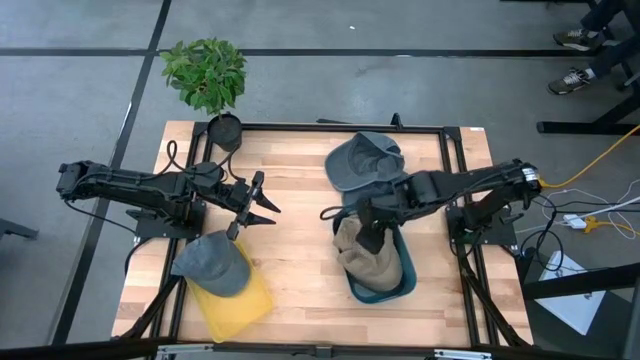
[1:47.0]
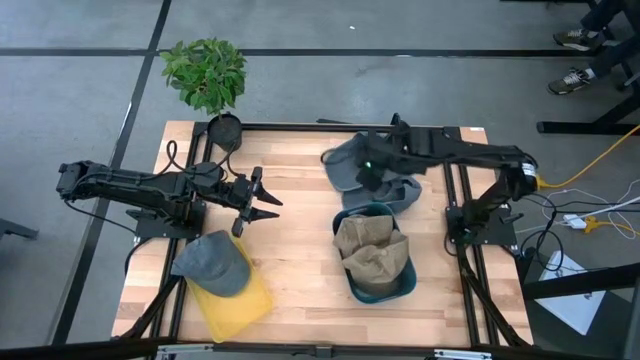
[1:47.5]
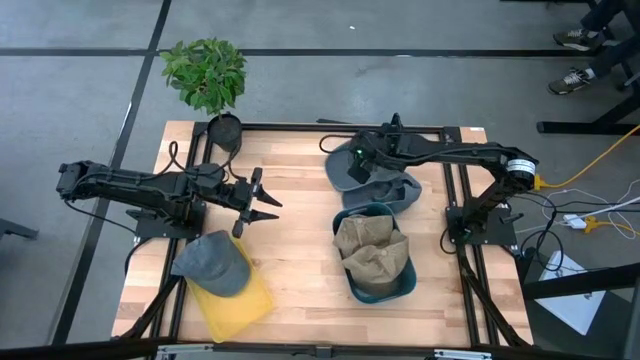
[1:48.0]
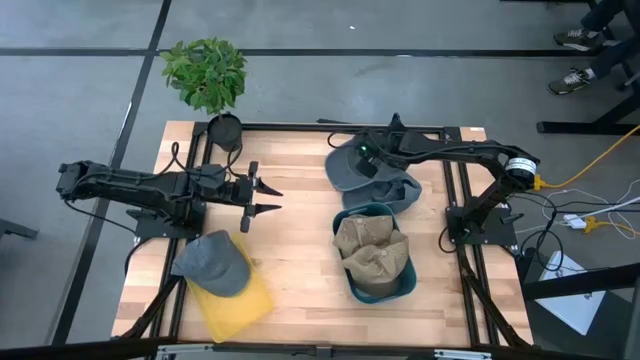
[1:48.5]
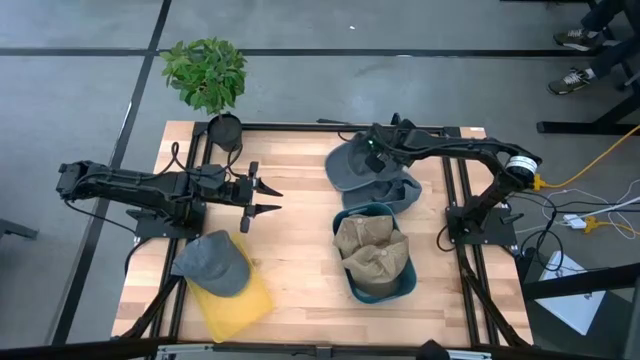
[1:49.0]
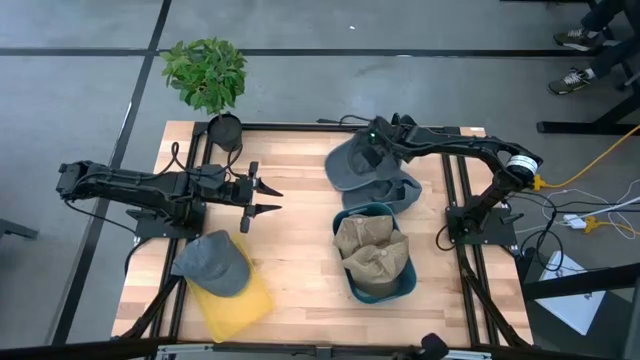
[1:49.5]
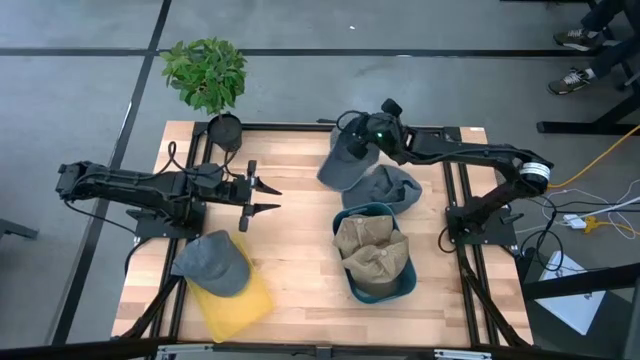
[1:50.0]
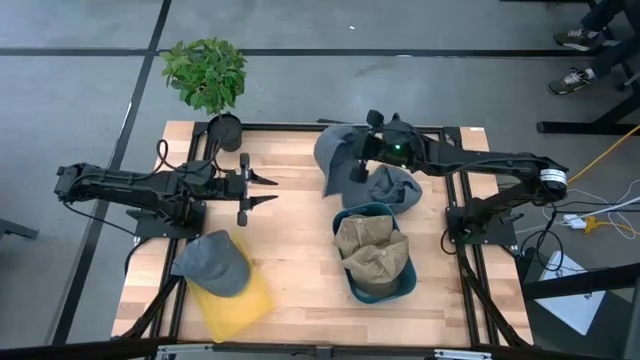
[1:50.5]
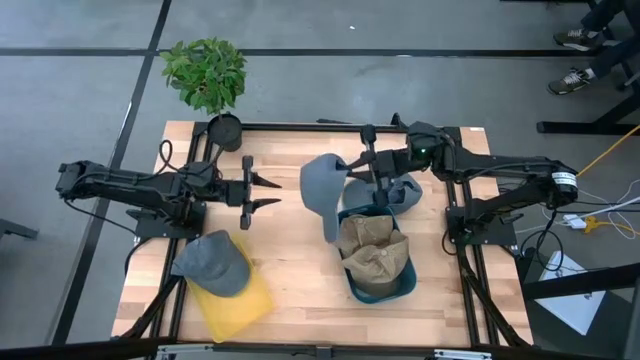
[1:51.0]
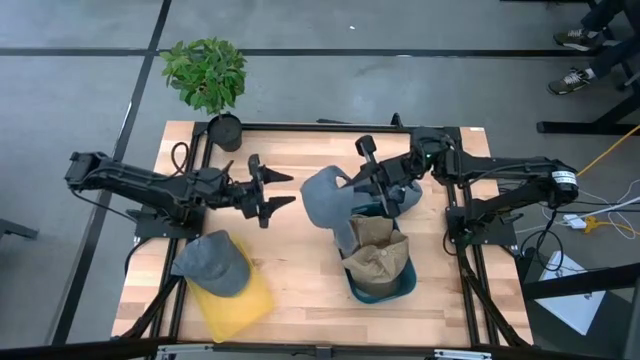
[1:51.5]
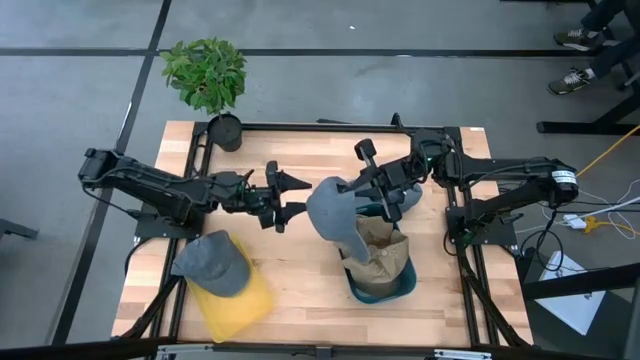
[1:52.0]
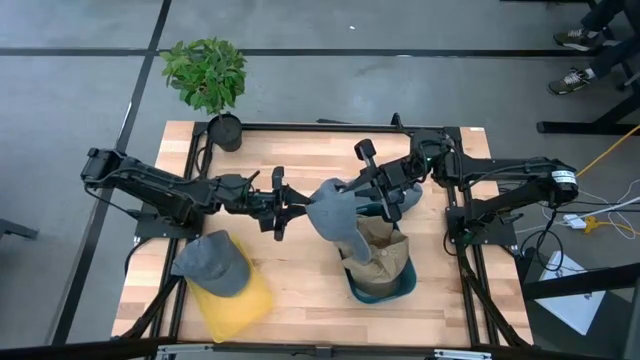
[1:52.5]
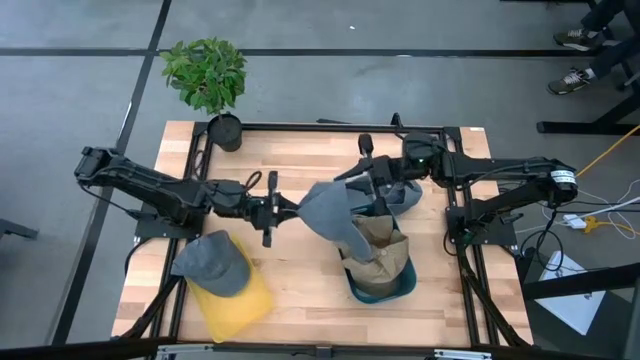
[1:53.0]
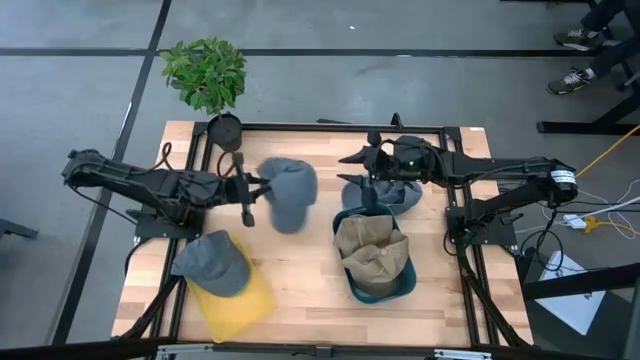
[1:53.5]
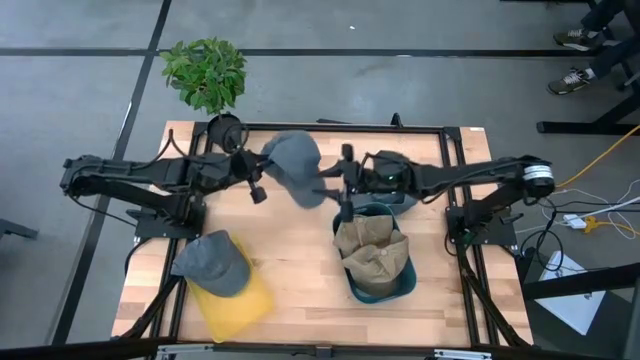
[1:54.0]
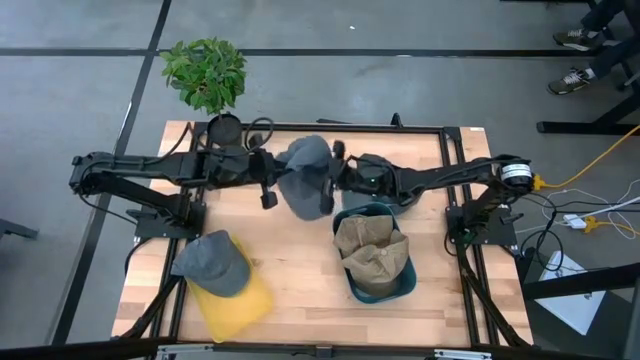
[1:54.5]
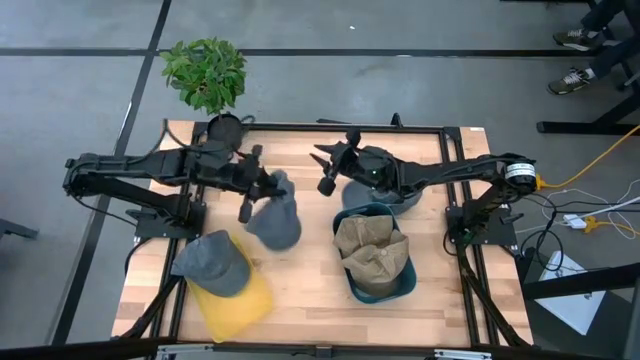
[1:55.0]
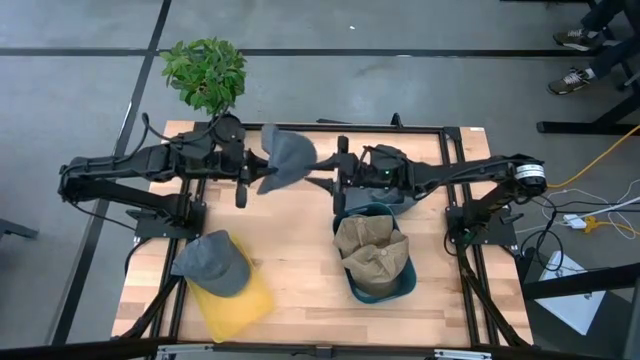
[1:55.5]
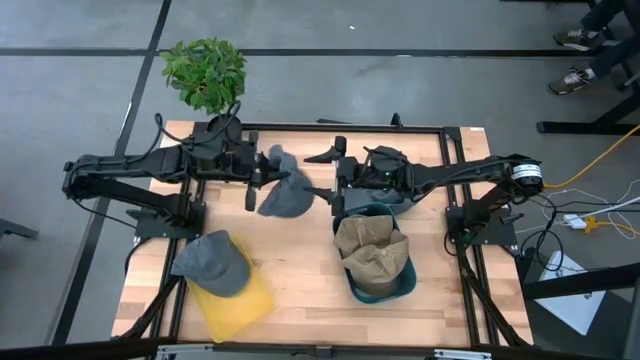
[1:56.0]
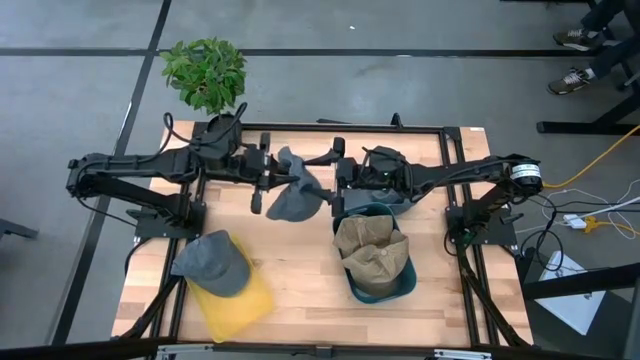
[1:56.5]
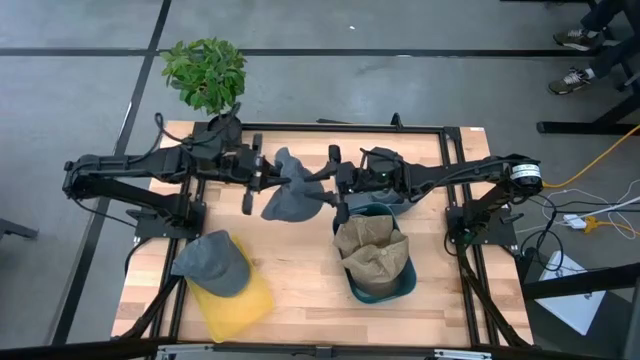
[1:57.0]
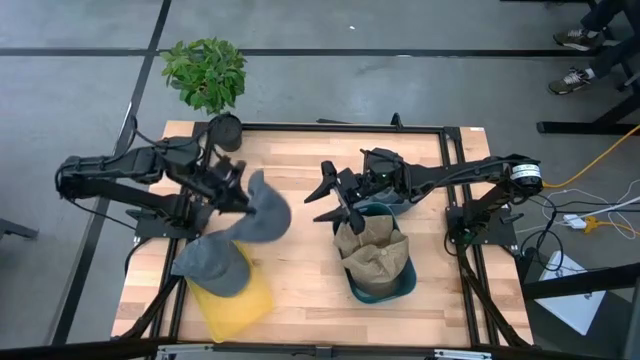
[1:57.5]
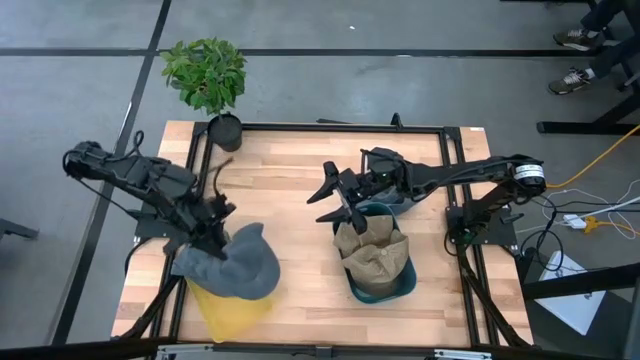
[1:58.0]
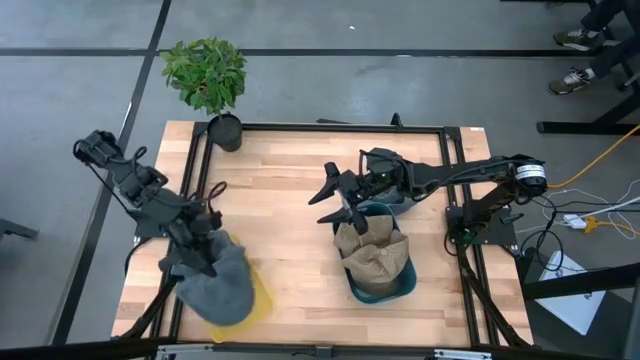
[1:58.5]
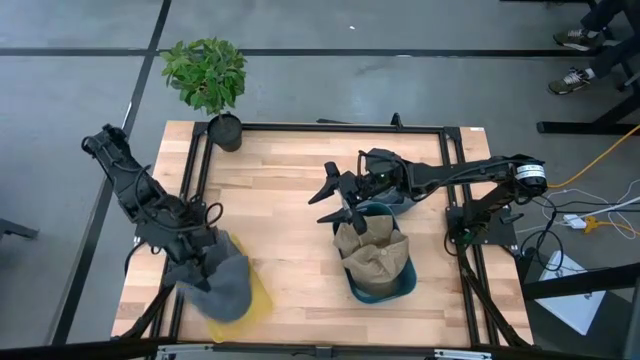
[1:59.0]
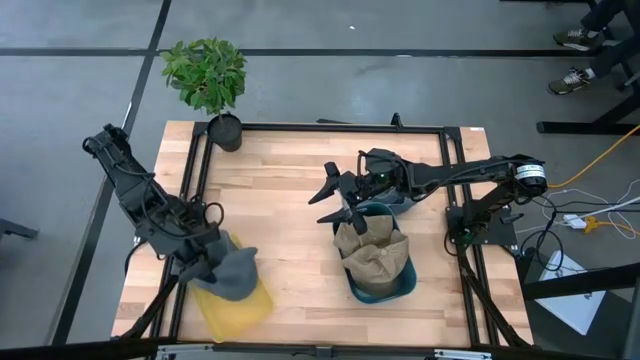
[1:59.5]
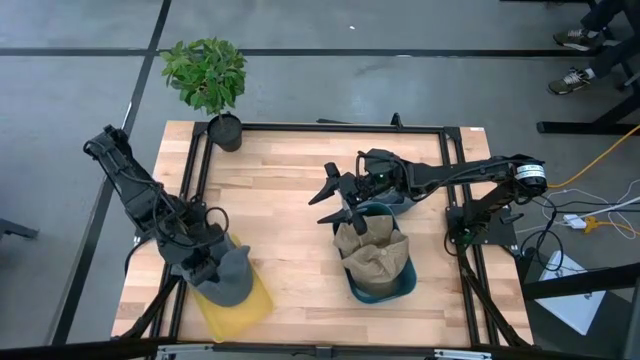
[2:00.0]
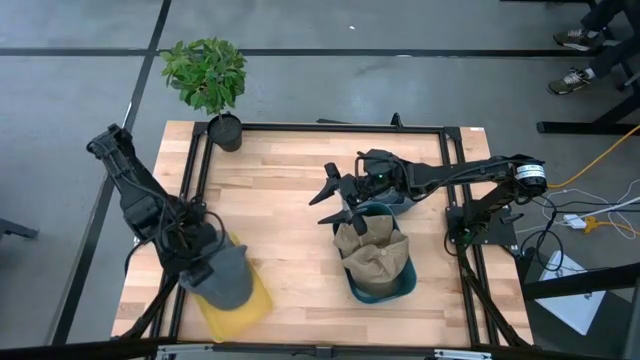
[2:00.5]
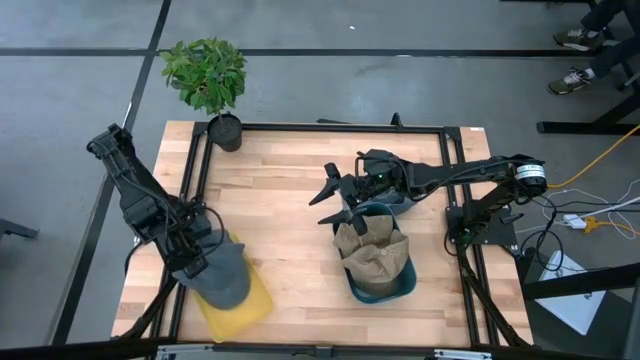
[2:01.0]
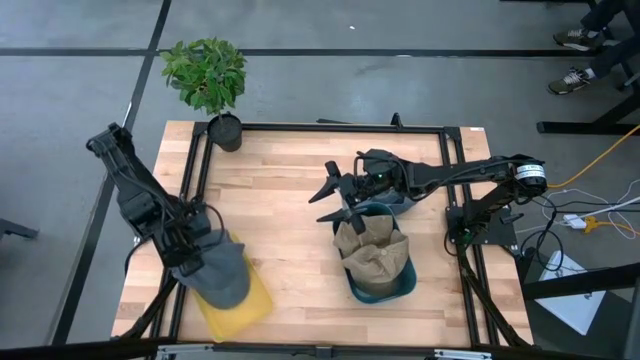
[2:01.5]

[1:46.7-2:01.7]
Task: Pick & Place hat
Put the top blue cap into the yellow bin

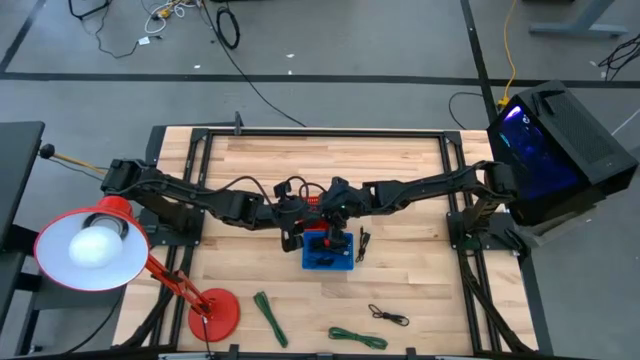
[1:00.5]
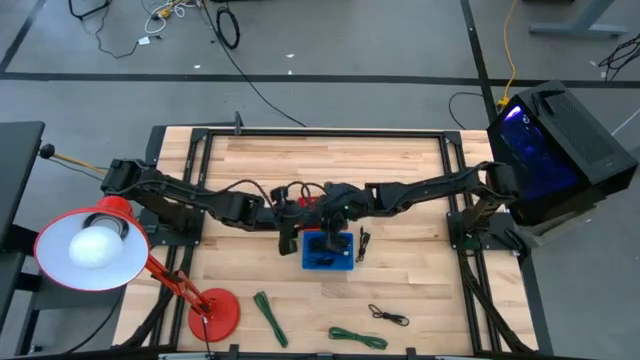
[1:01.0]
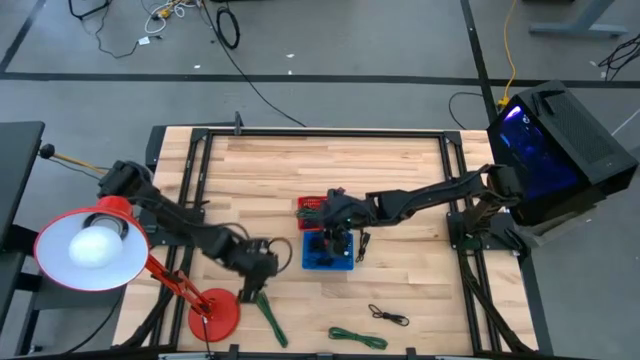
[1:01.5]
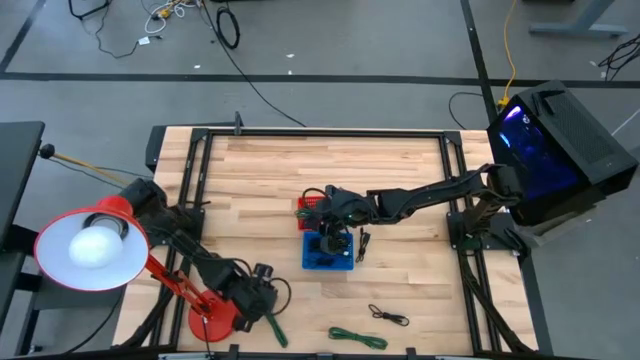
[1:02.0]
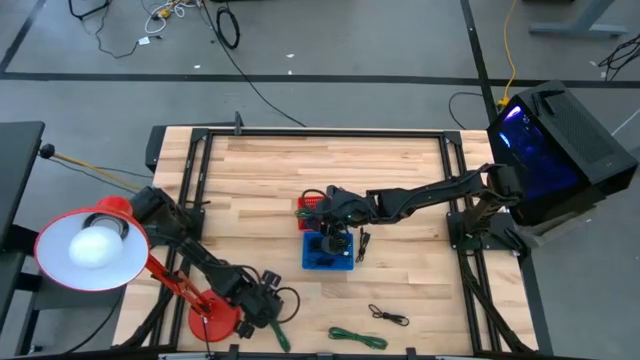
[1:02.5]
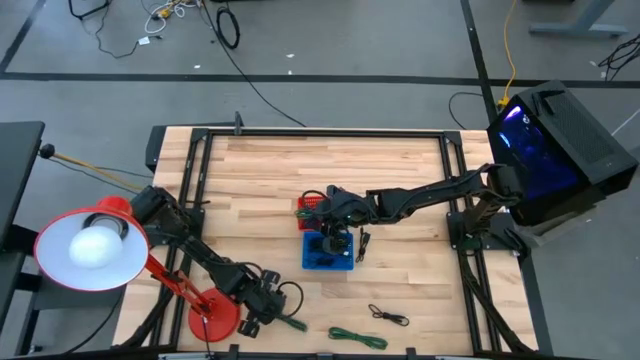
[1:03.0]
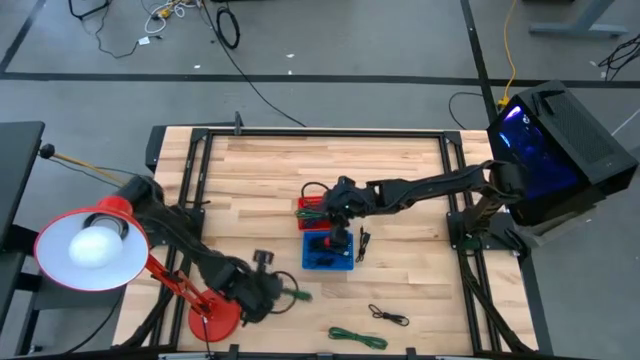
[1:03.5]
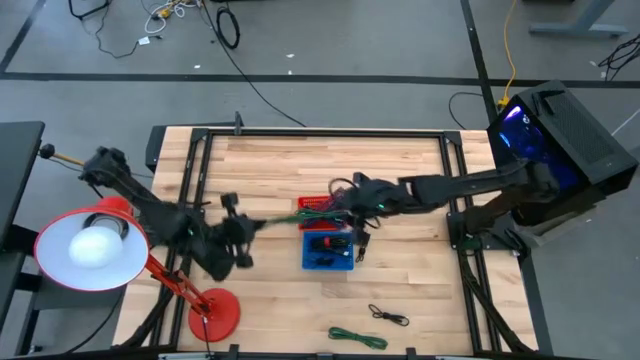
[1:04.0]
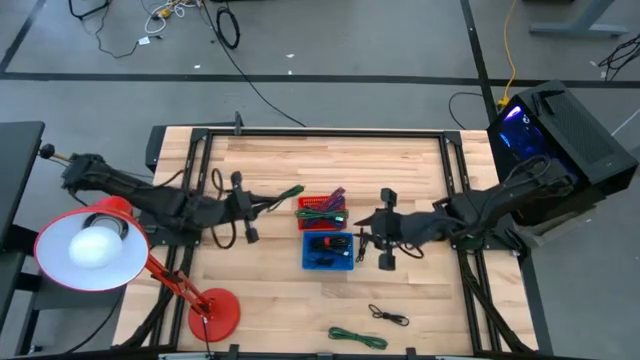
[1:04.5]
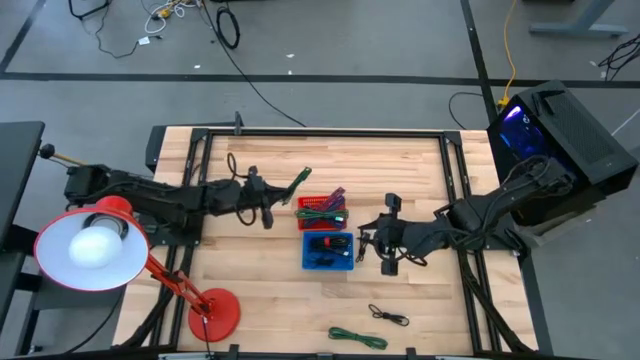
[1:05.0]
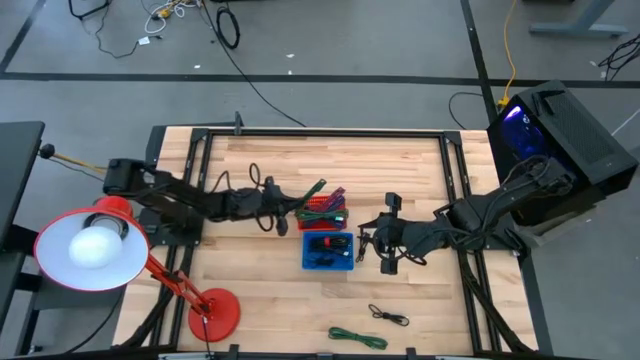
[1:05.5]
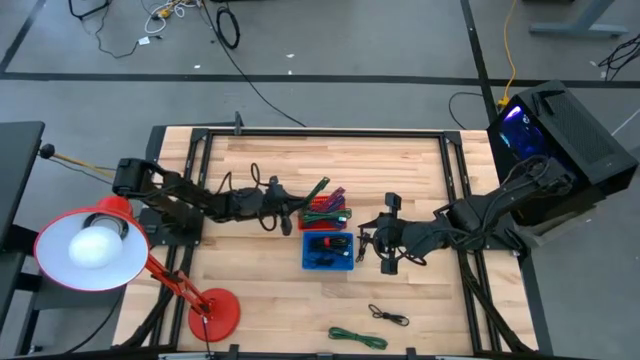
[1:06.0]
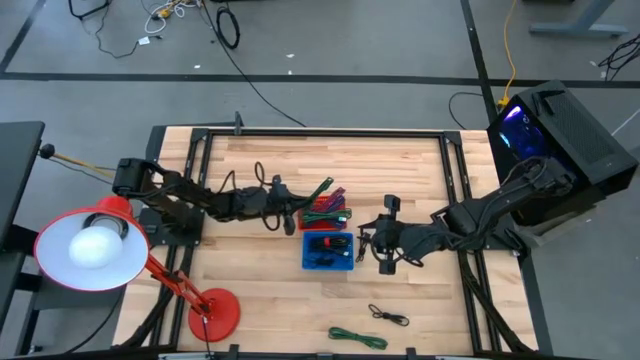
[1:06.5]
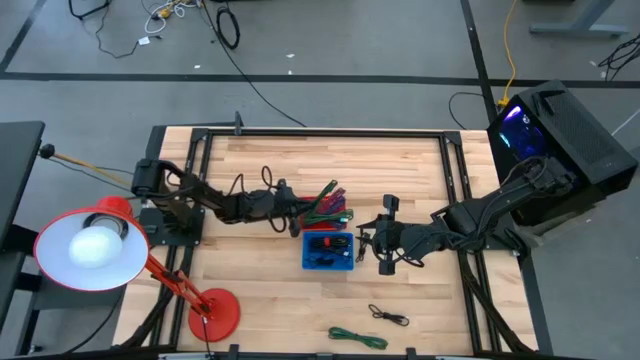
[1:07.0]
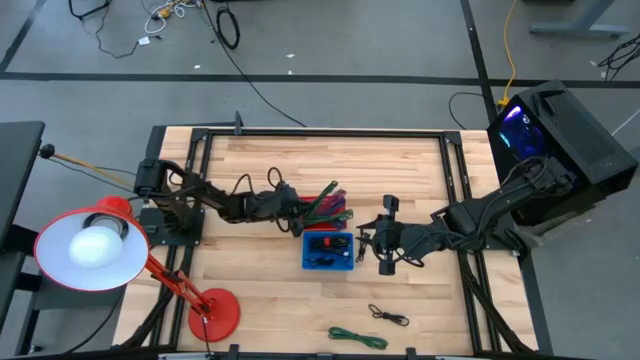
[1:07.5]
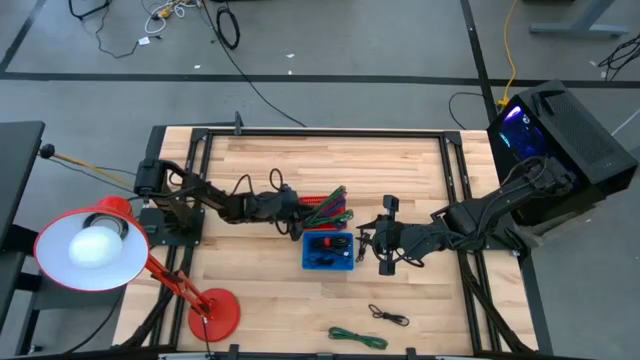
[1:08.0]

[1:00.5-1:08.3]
Task: Pick & Place USB Port
Put the green charger cable into the red bin
